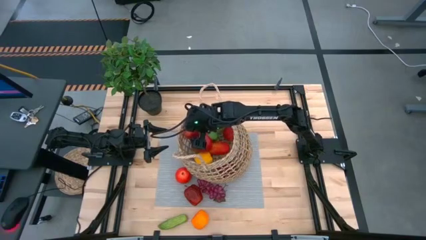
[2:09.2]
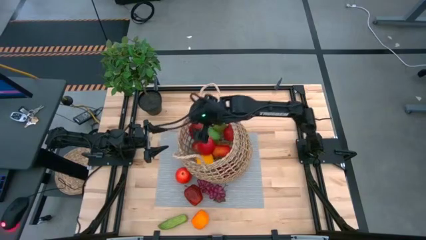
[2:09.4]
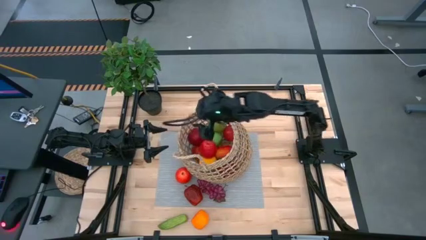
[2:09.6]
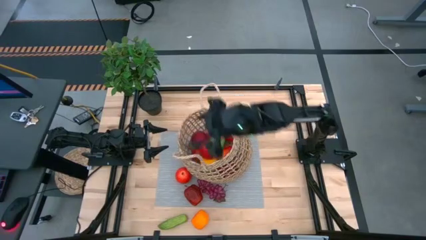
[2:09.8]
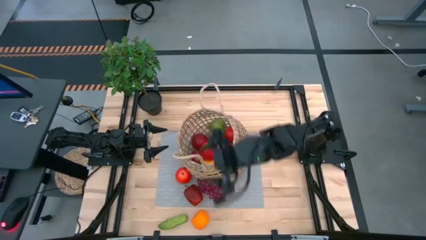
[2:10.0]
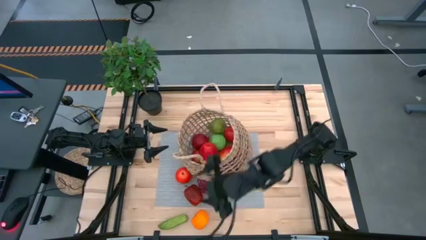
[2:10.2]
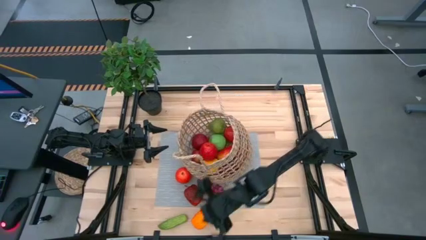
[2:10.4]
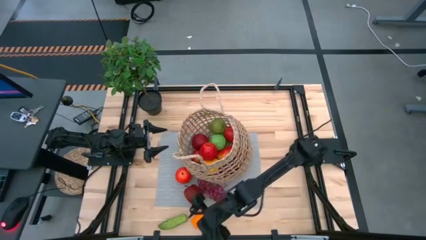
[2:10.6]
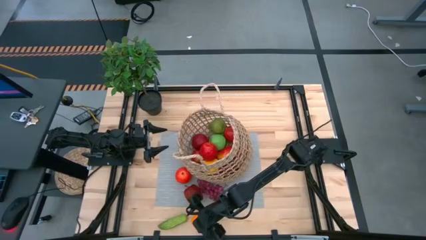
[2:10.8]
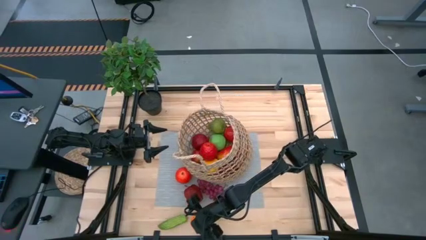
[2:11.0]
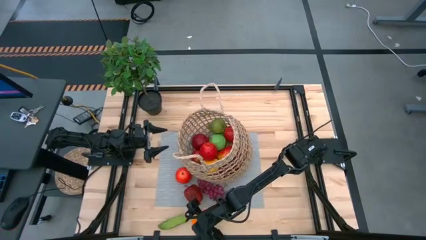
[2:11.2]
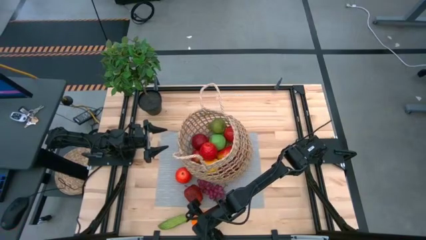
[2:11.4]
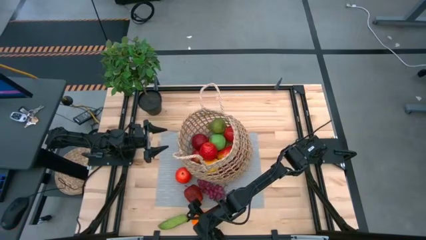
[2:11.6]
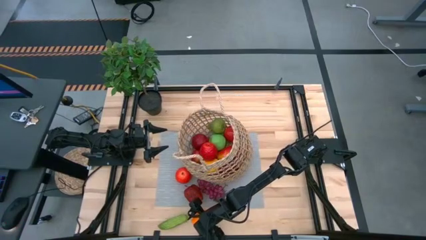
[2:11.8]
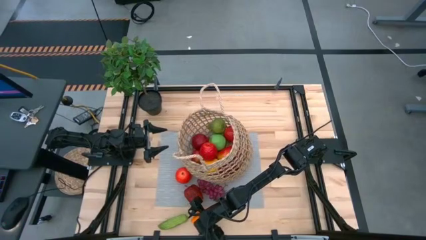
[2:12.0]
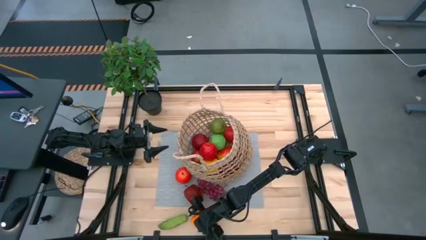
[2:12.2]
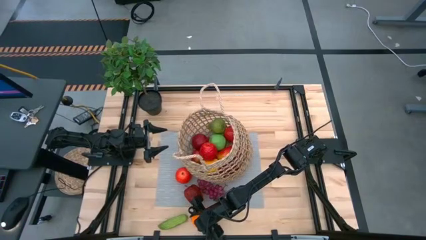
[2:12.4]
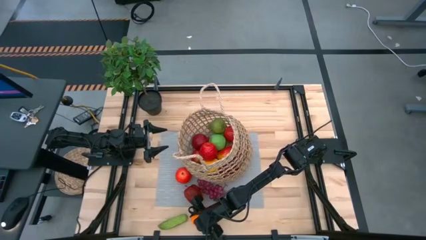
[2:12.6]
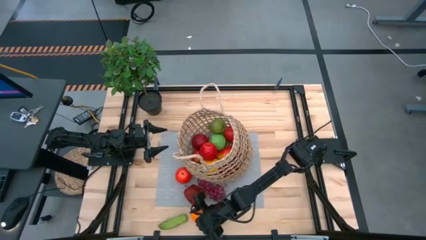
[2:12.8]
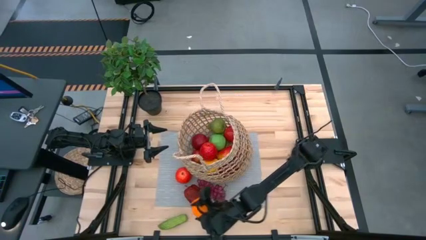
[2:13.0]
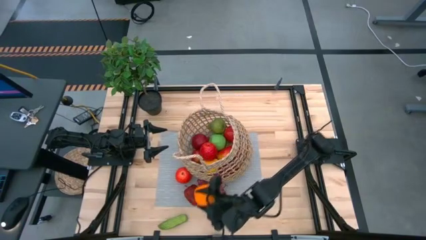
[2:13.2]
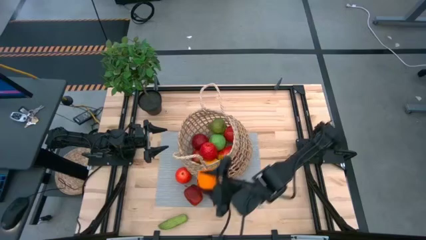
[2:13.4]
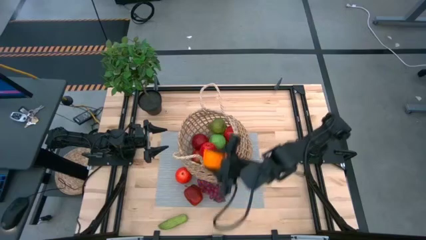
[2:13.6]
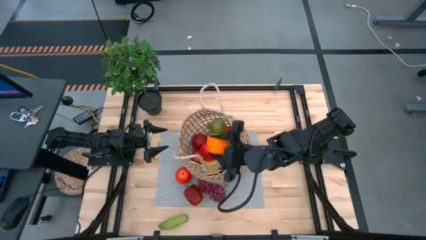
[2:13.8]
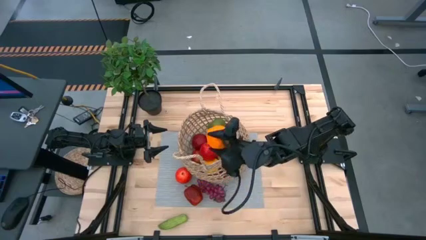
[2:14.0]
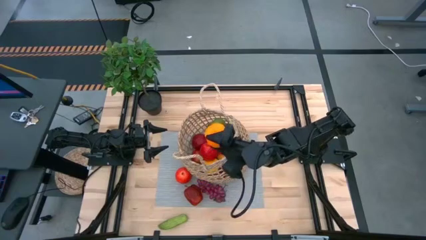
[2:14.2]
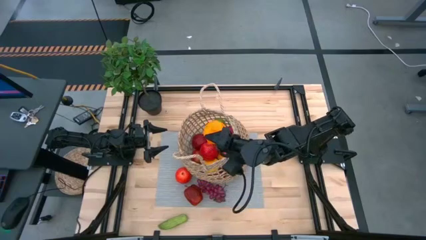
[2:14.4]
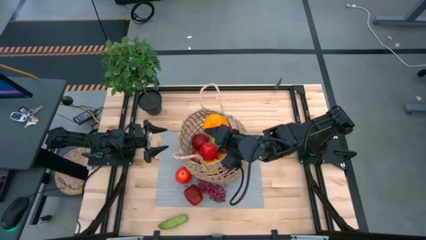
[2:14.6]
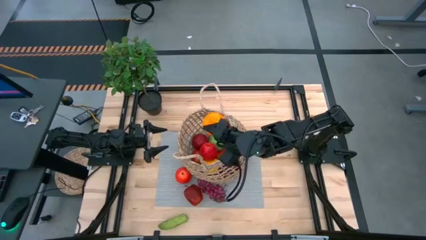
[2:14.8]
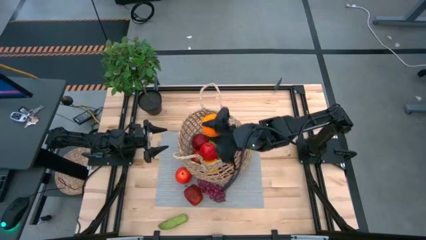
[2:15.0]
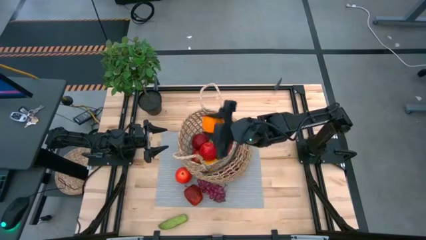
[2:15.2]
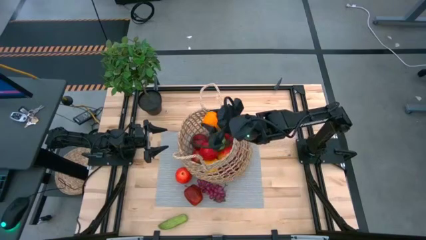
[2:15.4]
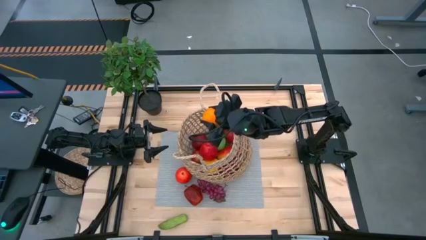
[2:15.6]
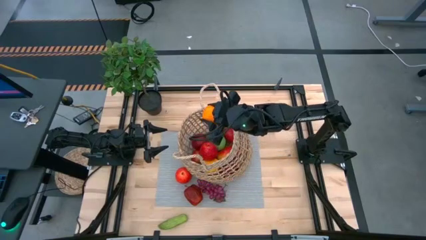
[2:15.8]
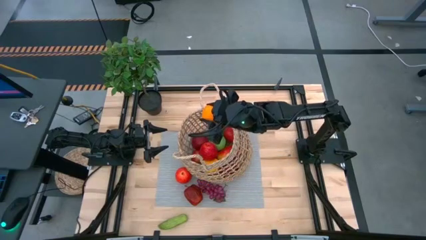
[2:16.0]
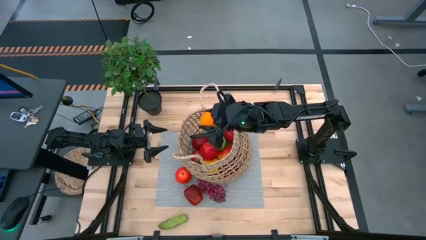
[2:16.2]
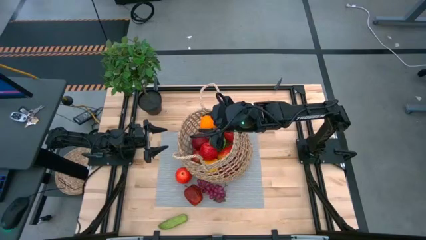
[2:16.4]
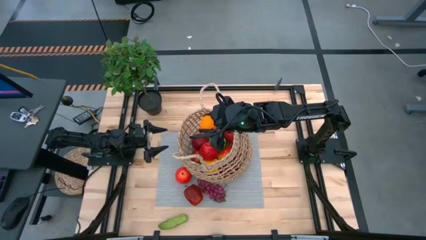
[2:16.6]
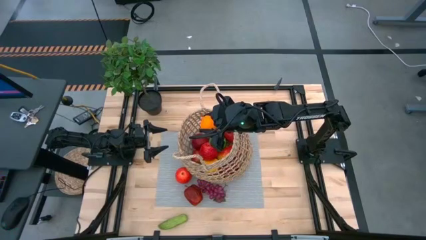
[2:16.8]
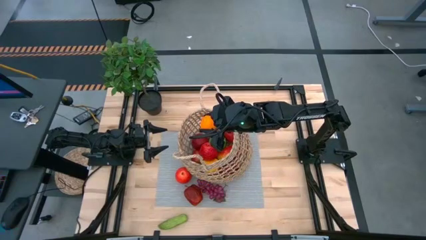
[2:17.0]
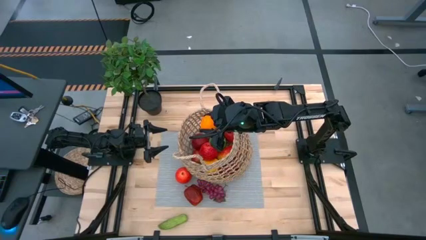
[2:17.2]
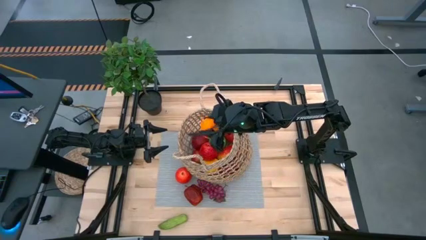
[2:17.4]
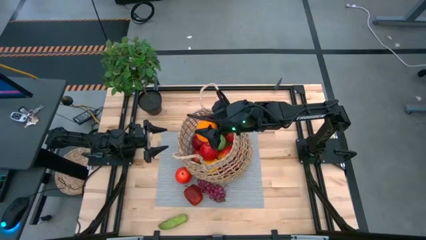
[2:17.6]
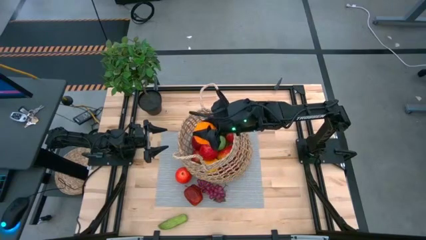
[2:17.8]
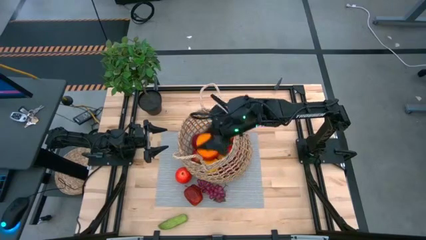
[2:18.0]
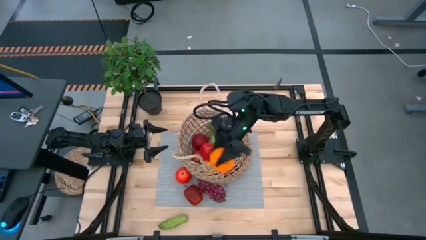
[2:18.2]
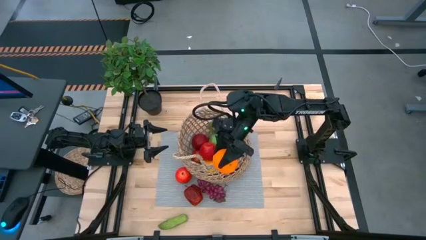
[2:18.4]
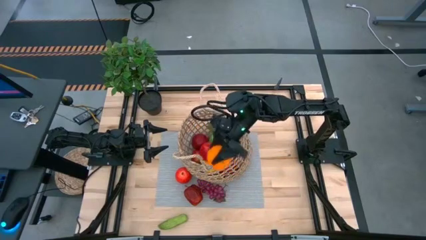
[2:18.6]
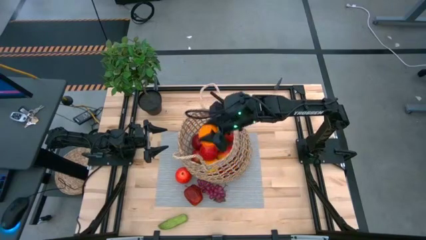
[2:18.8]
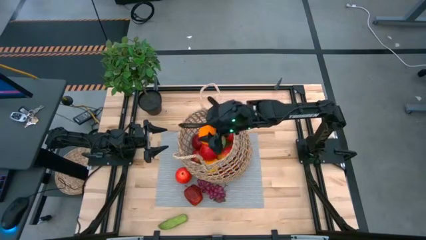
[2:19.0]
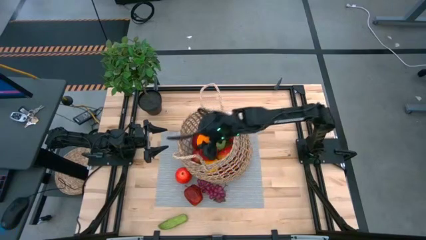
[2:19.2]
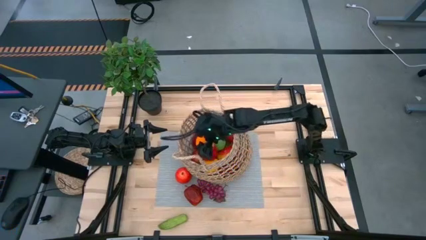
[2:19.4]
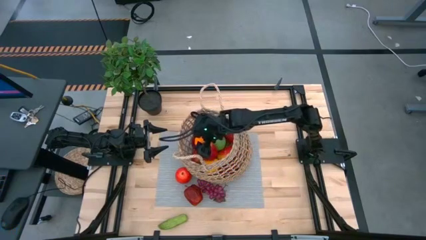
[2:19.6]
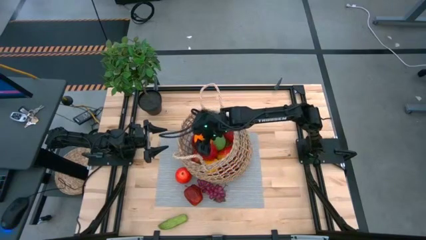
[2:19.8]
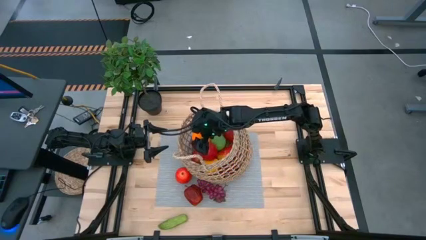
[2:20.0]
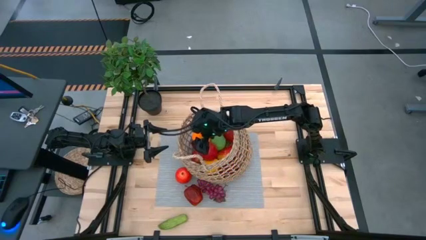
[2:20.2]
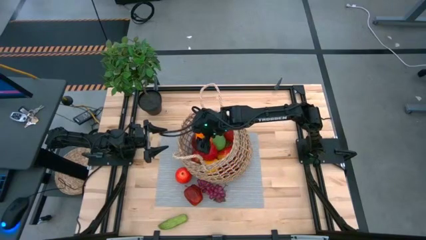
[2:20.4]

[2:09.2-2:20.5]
Task: Build produce basket
Put the orange into the basket

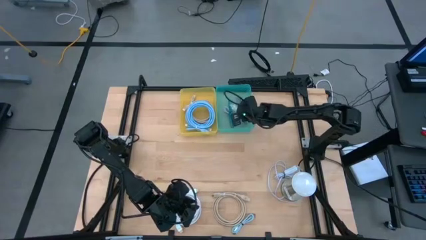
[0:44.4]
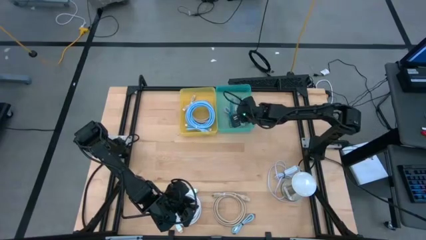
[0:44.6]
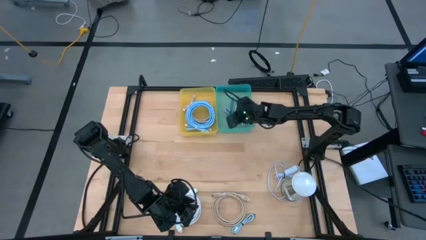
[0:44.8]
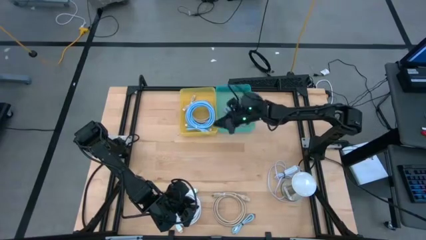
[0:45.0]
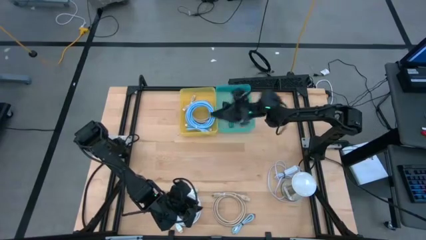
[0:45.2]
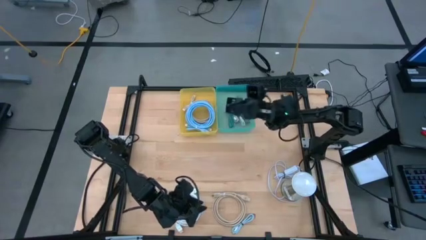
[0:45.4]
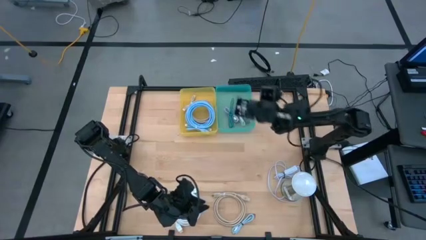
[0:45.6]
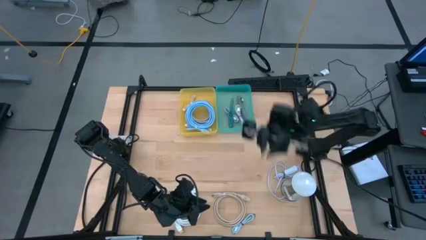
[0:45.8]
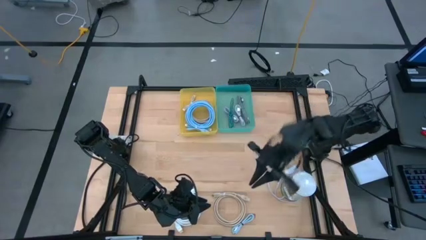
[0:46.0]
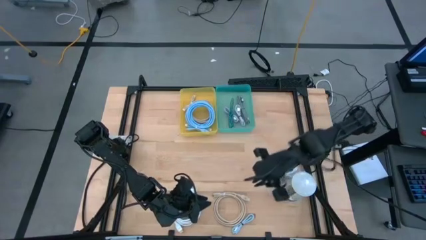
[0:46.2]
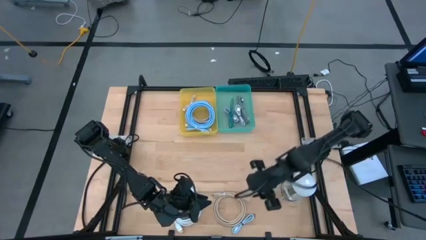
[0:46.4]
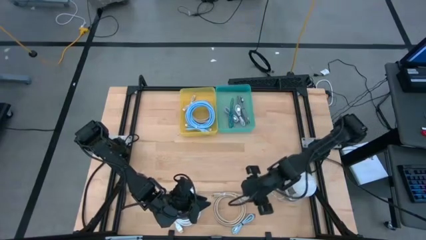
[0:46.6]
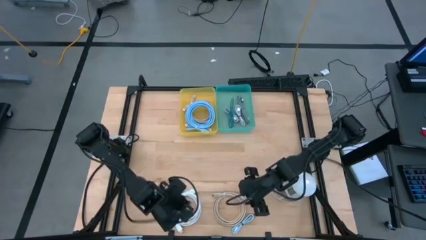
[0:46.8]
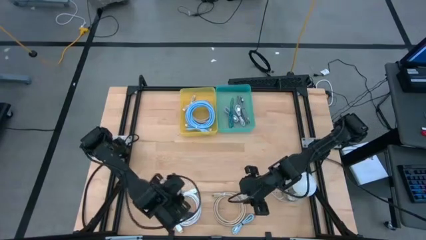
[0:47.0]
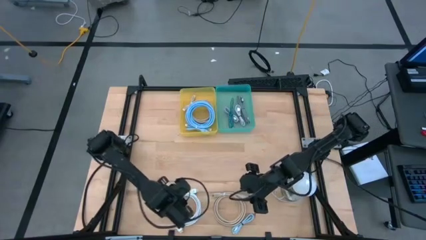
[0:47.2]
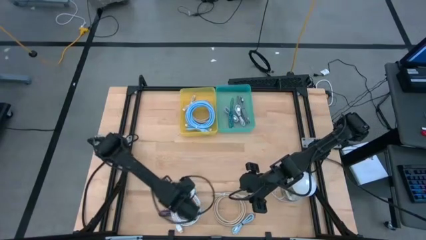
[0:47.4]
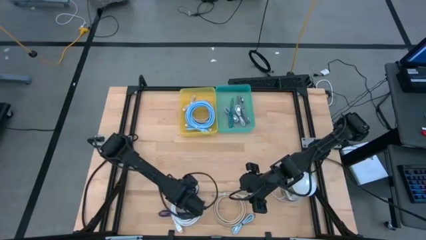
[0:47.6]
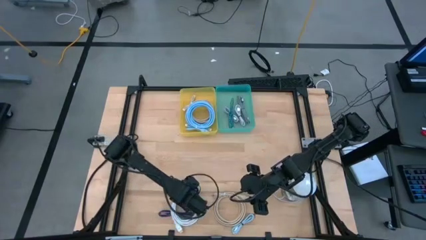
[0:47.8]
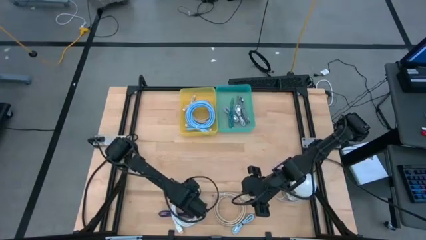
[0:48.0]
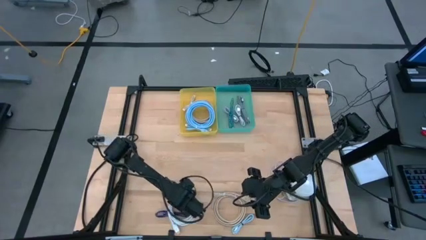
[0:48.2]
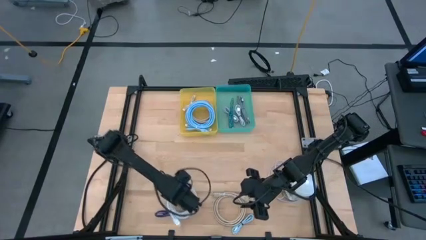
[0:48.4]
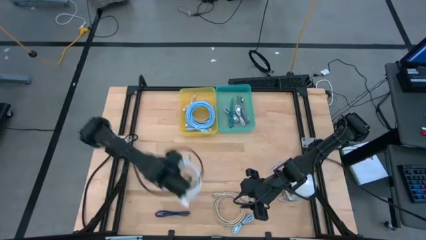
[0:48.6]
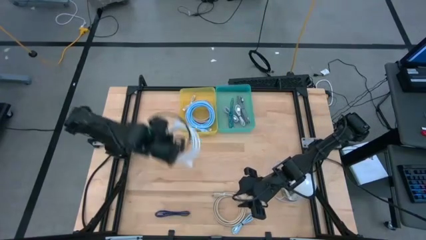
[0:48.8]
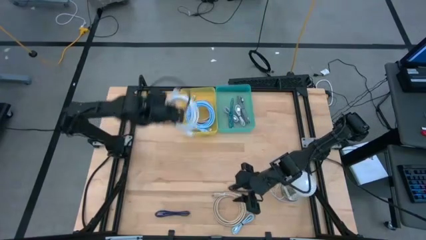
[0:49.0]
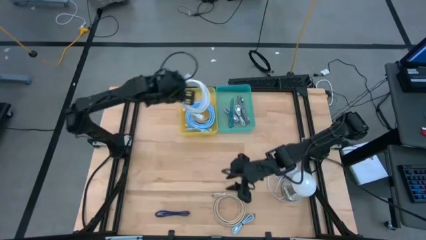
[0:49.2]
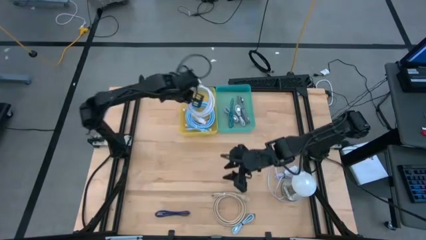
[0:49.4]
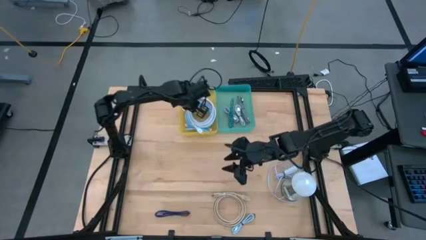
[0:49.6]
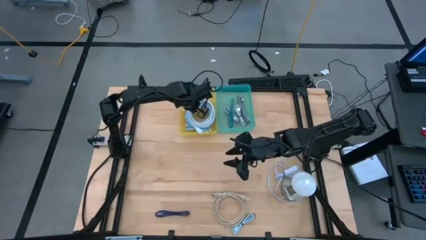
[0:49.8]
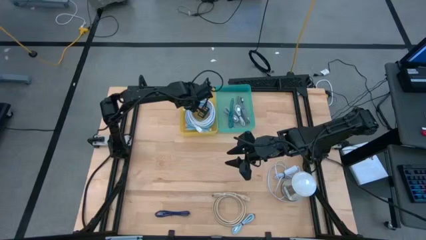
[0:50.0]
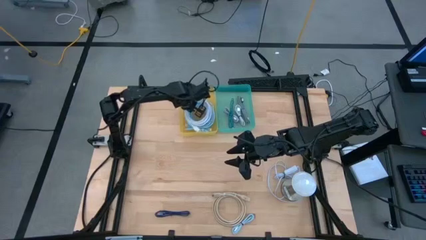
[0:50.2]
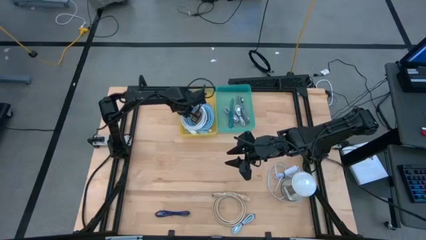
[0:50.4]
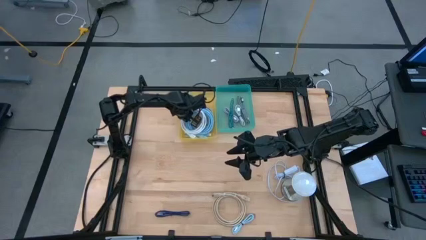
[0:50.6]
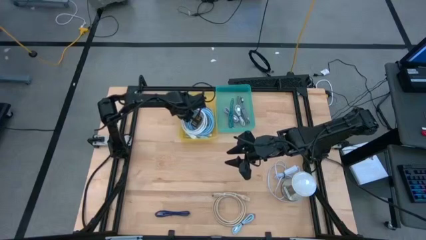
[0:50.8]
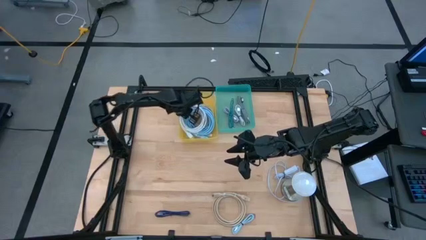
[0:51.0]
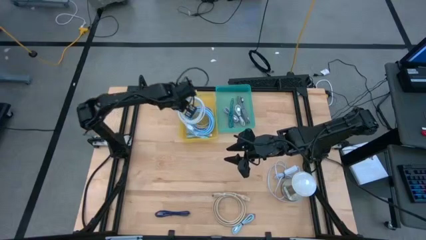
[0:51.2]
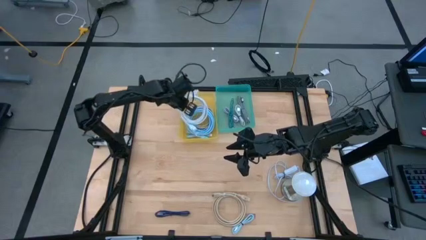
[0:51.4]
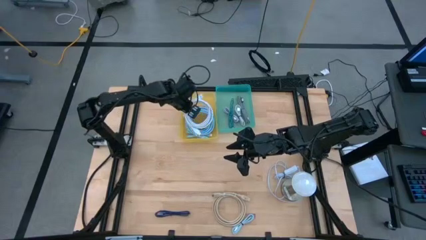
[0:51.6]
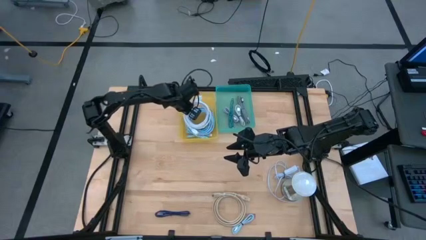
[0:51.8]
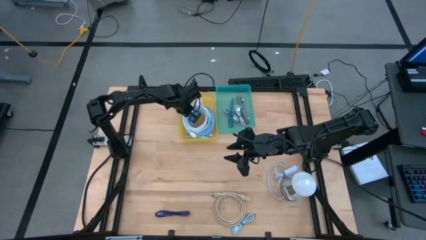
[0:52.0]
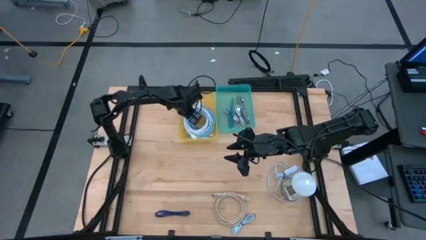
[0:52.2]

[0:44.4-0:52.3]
Task: Pick & Place USB Port
Put the white HDMI cable into the yellow bin
